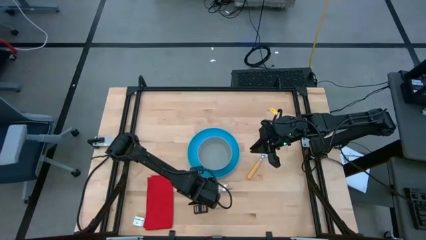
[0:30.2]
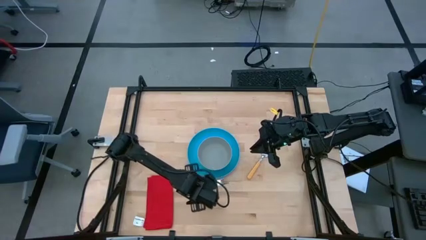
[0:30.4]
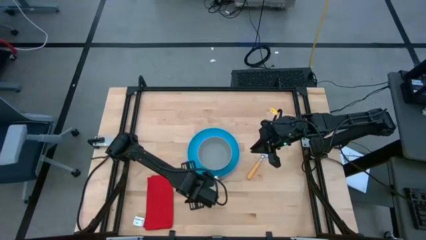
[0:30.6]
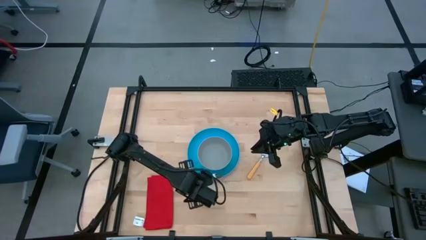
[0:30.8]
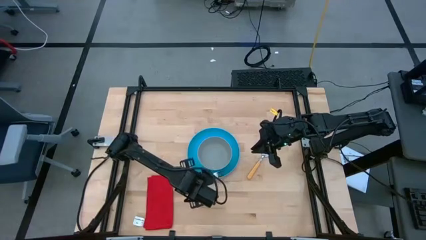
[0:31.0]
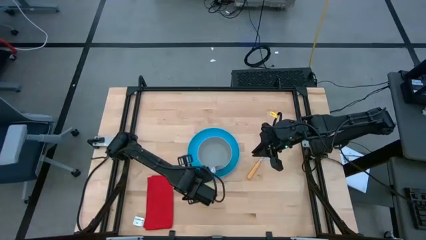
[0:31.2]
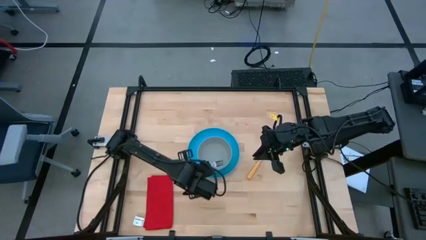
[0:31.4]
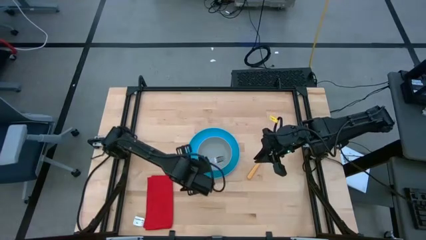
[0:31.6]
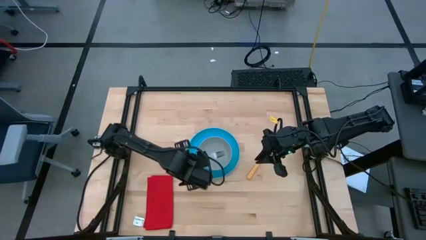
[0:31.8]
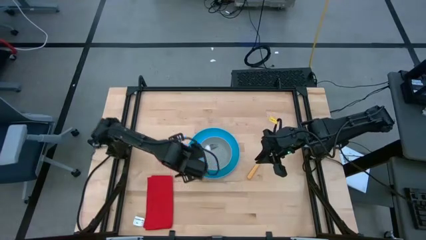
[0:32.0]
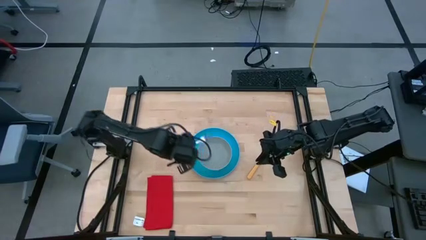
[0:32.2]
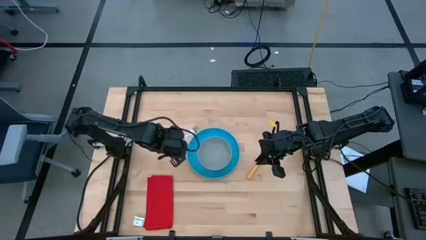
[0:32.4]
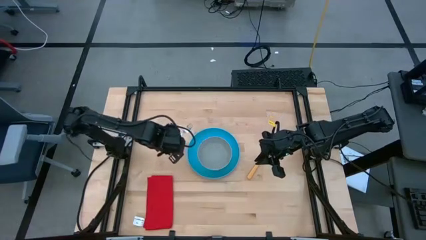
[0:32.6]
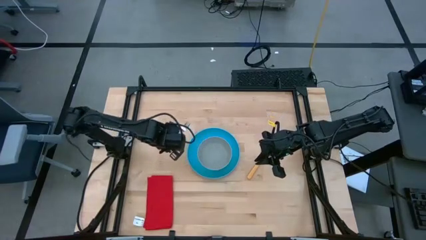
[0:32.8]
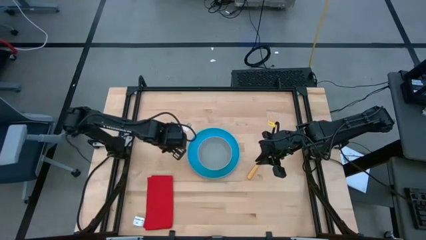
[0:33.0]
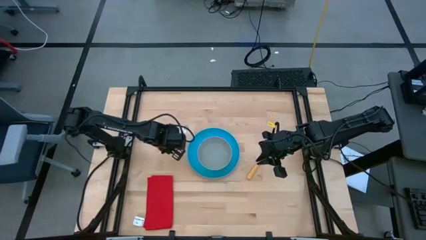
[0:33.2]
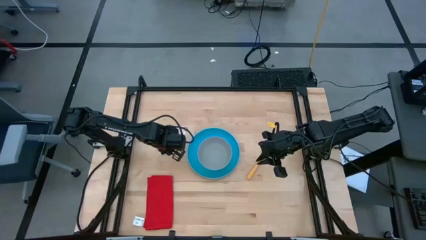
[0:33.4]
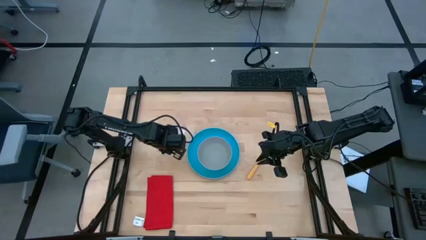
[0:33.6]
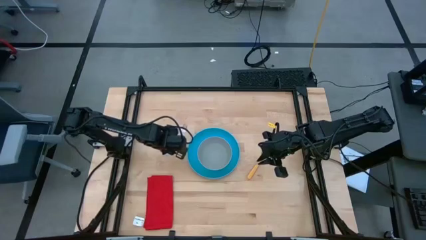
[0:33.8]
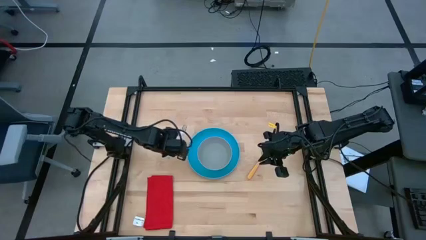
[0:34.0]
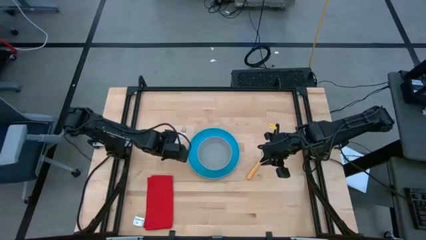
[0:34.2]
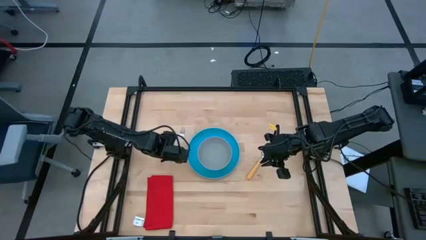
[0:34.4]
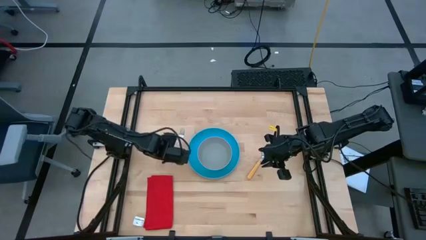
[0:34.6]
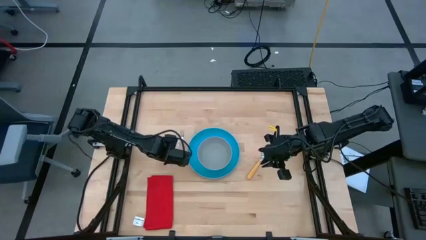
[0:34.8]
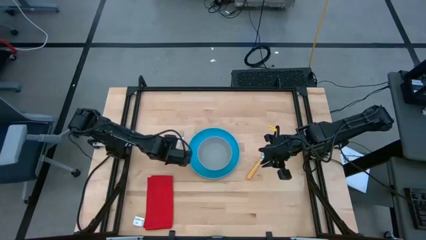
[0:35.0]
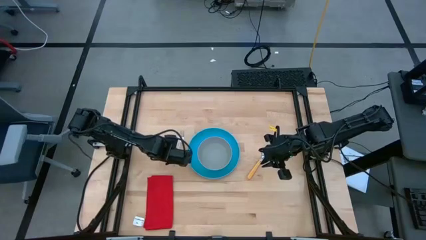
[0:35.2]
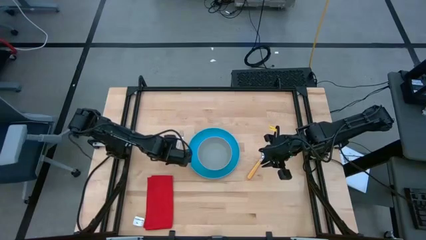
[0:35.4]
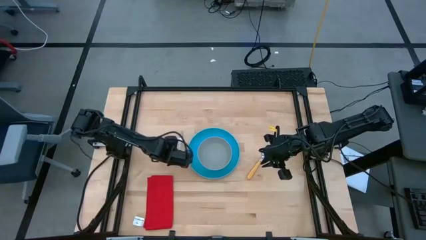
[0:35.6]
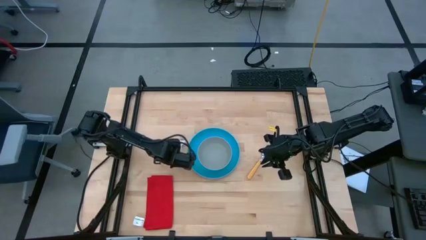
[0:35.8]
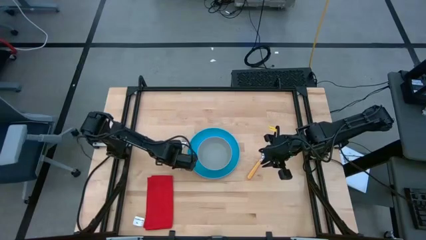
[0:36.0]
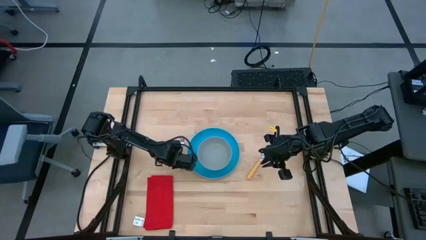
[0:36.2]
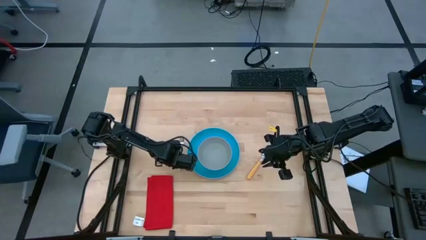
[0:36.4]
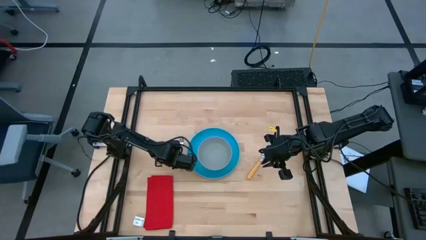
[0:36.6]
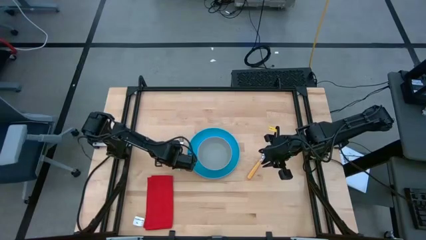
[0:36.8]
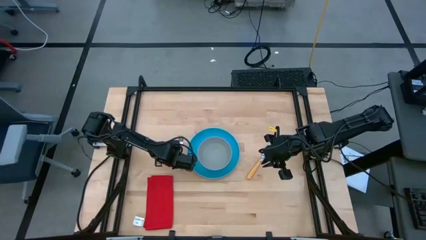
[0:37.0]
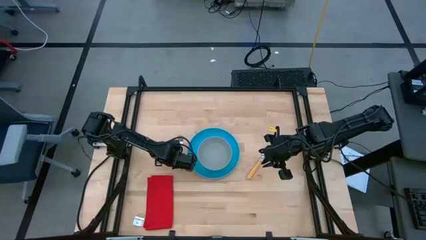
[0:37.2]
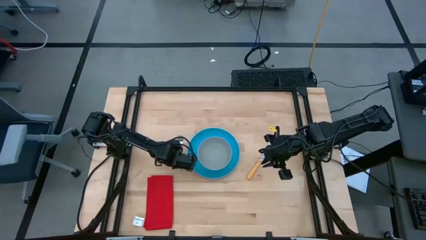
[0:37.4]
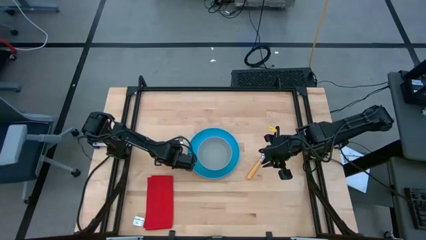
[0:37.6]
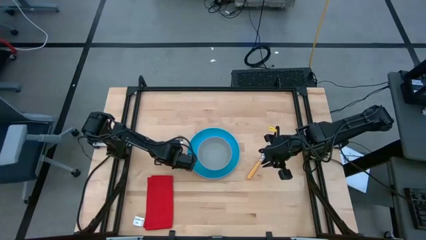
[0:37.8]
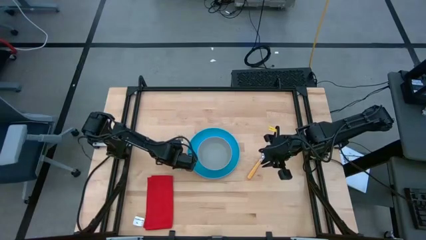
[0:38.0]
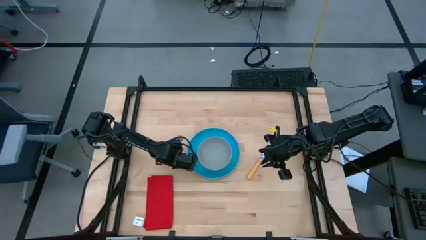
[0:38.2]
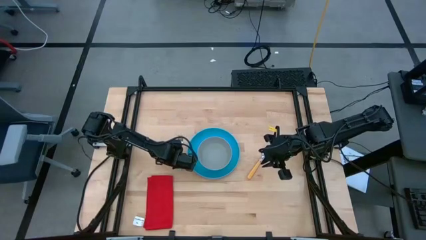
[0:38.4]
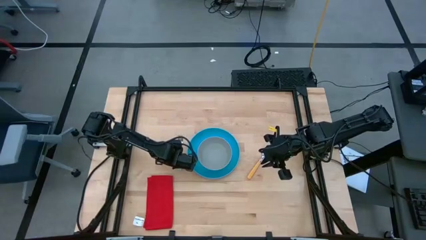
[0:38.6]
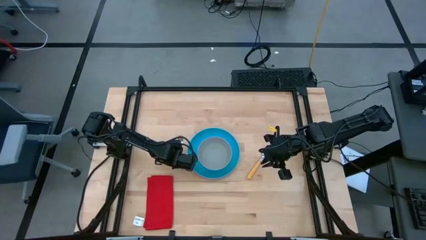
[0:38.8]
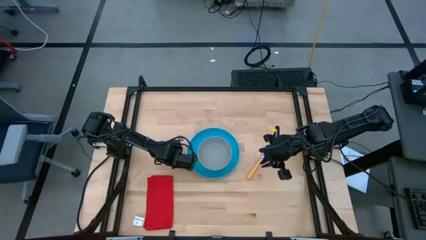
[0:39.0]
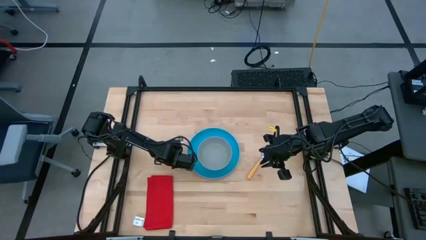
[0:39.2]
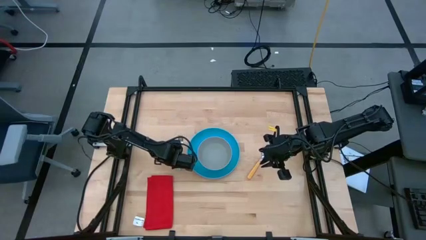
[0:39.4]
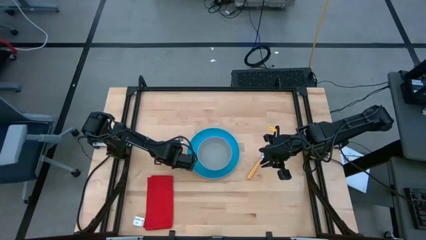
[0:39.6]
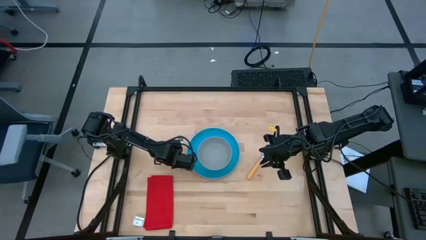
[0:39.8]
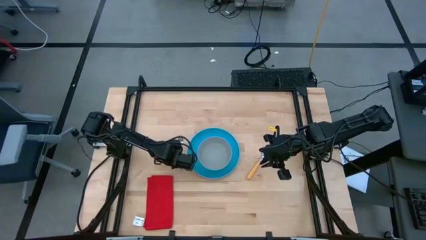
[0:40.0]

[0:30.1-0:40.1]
Task: Set table place
Put the blue fork to the left of the blue plate
